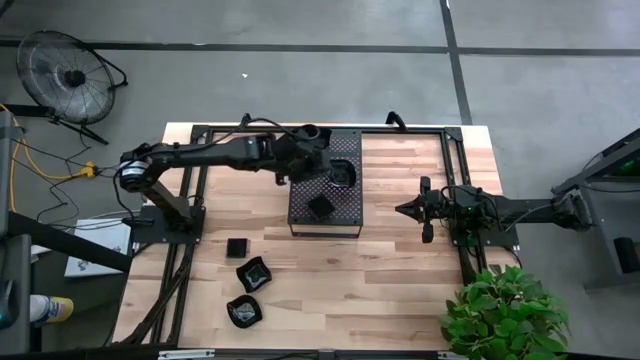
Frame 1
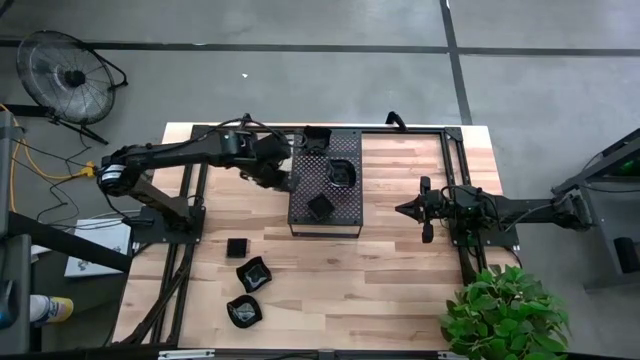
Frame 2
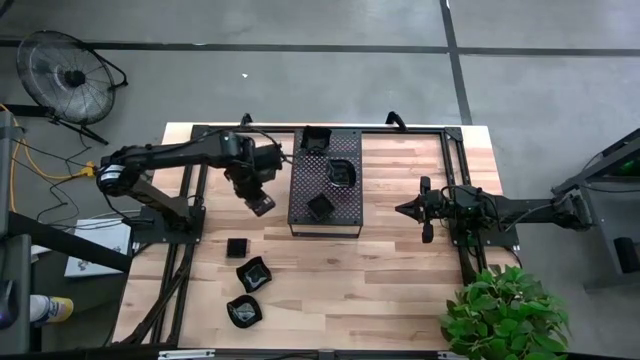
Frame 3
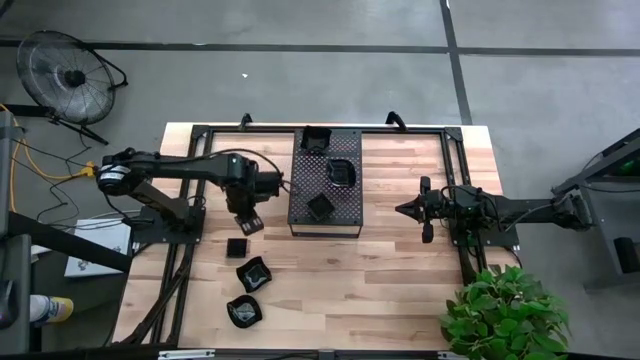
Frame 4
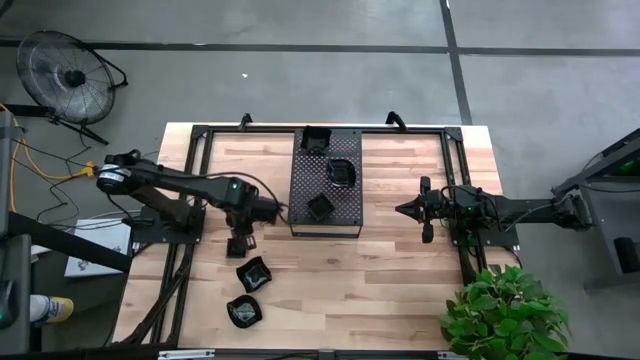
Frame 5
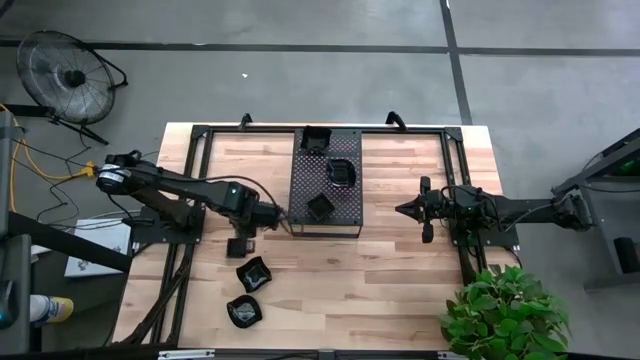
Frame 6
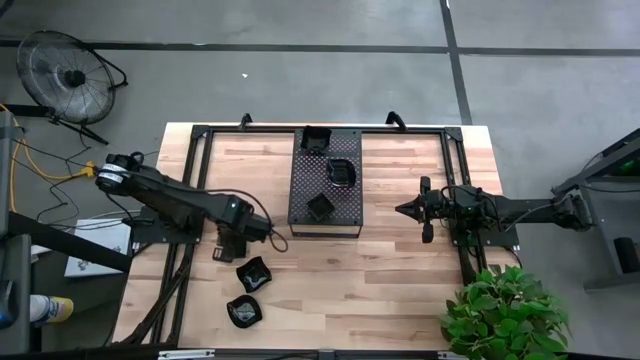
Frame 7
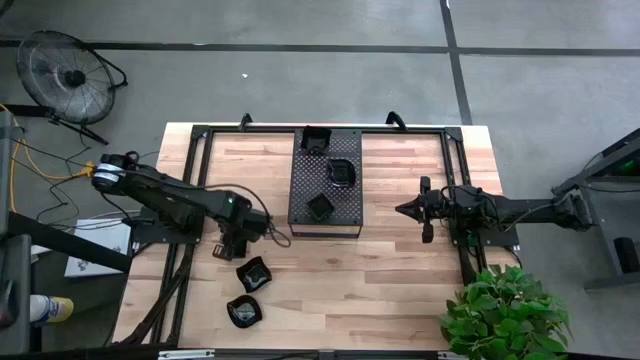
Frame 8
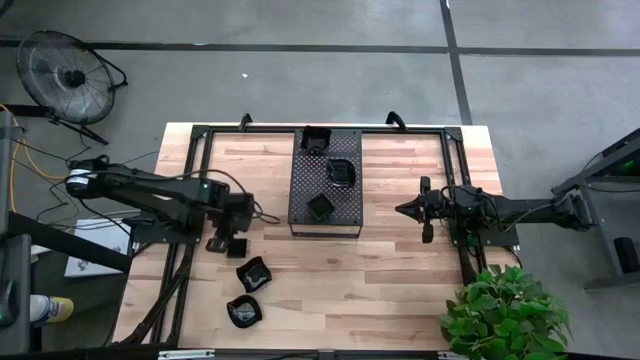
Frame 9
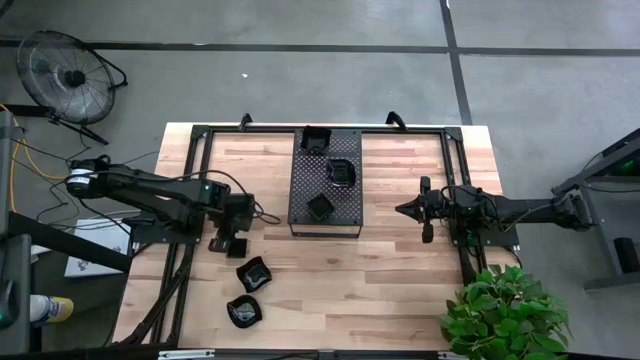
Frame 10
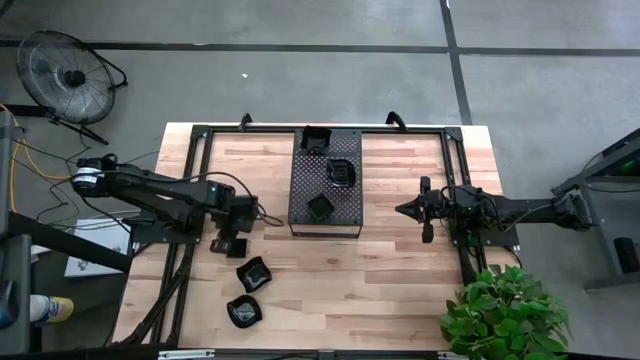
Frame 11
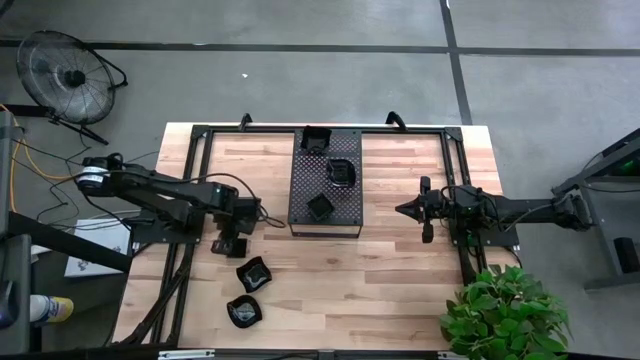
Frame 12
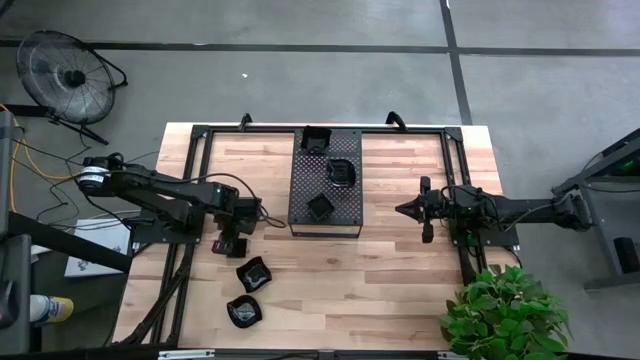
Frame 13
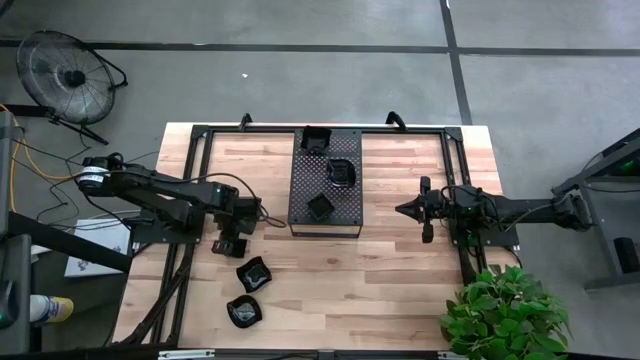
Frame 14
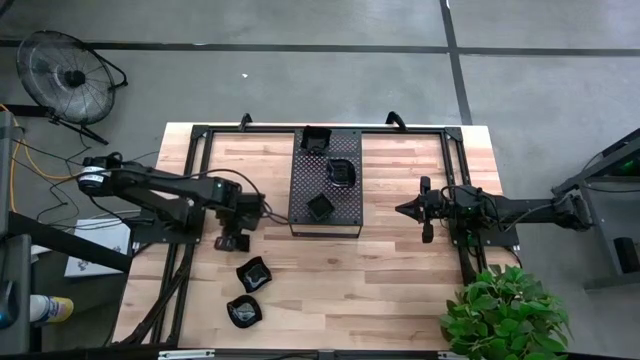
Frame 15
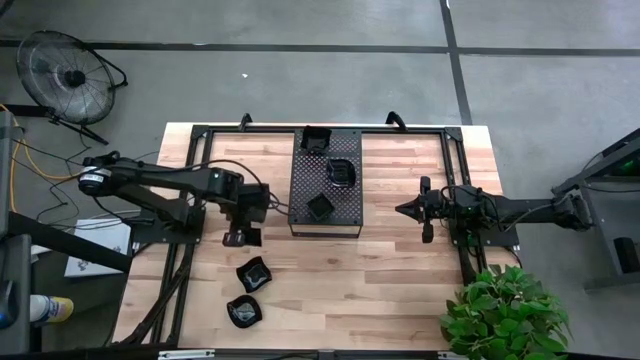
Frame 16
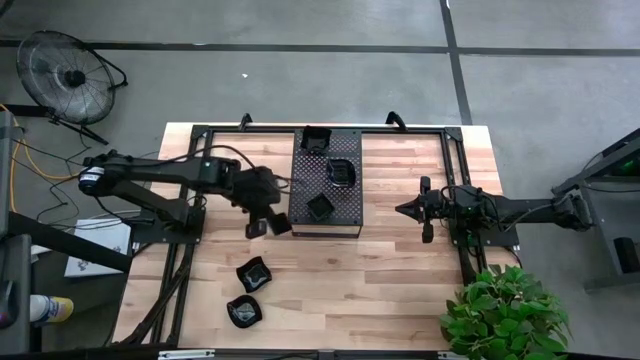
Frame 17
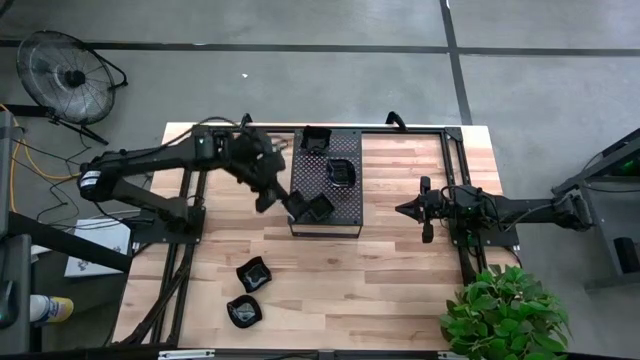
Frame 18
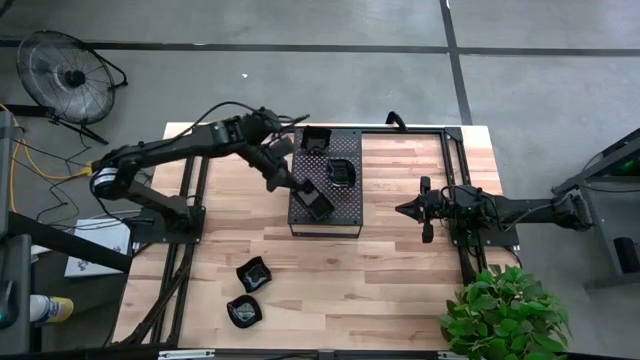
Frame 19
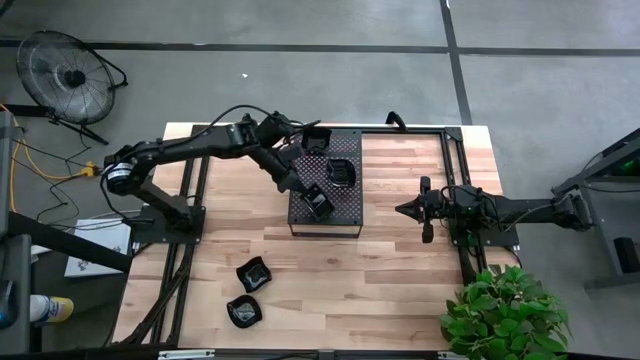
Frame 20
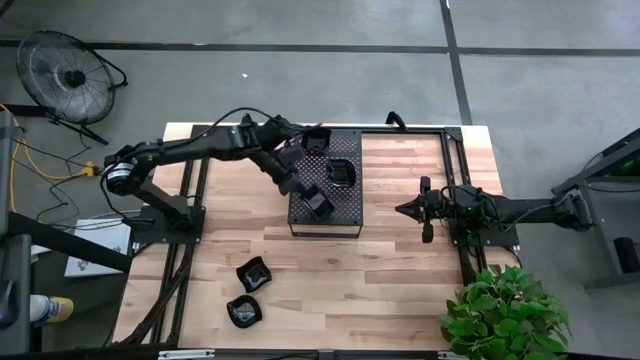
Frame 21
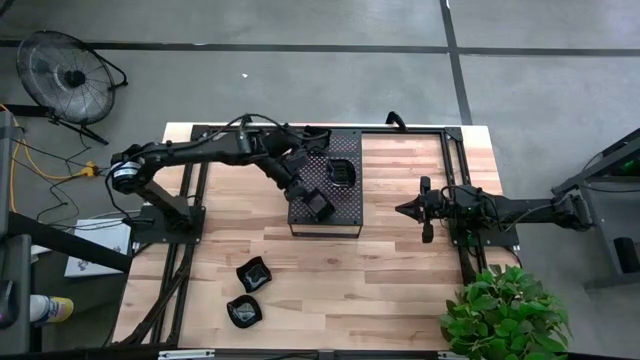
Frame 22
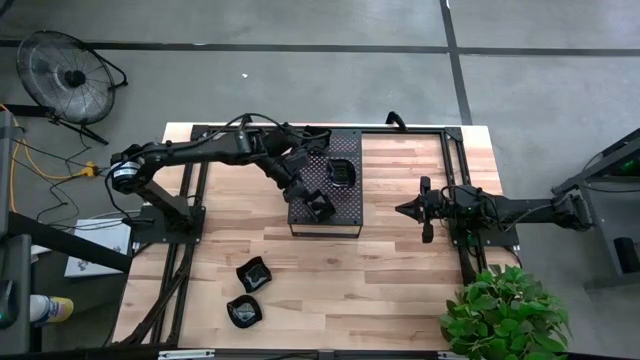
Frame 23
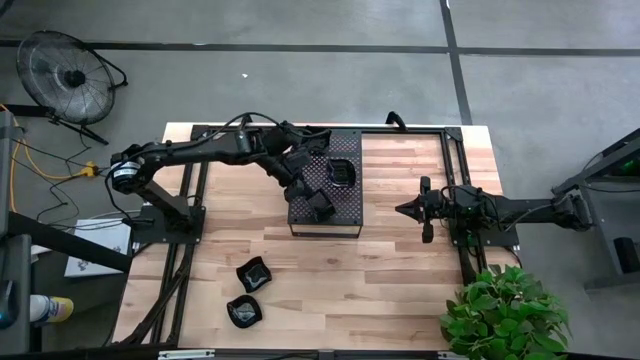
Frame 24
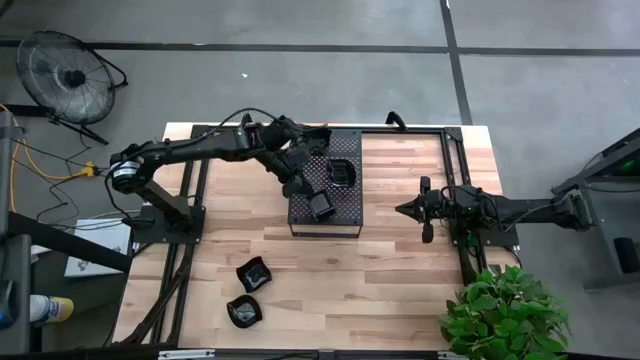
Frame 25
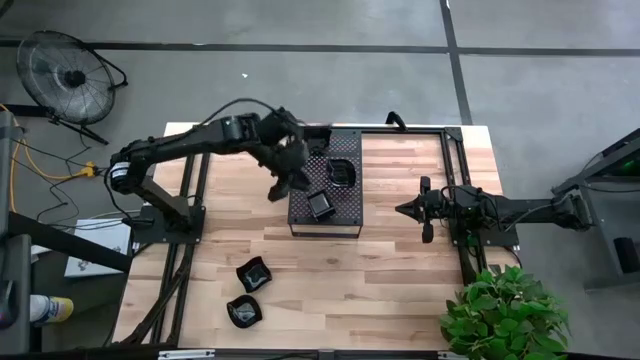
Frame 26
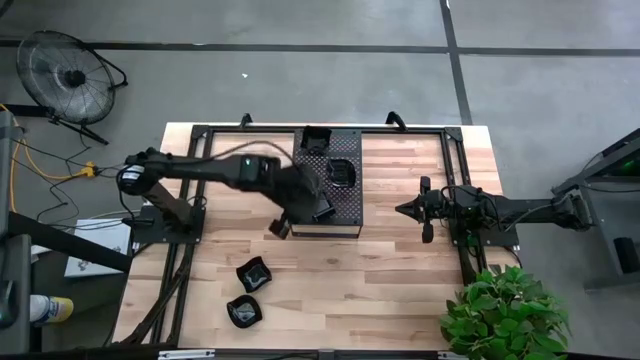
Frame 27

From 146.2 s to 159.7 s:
Task: Pick & Place Mini shaped plates
Stack the black square shape plate on top of the other black square shape plate on the shelf

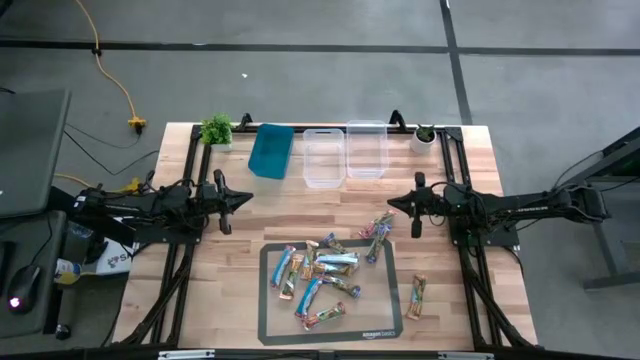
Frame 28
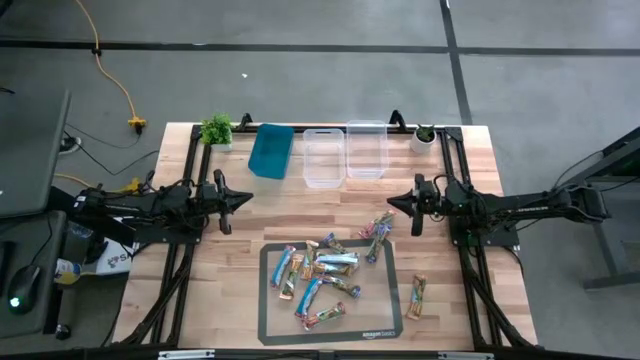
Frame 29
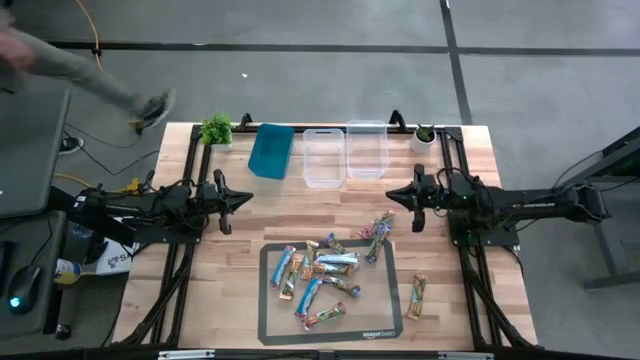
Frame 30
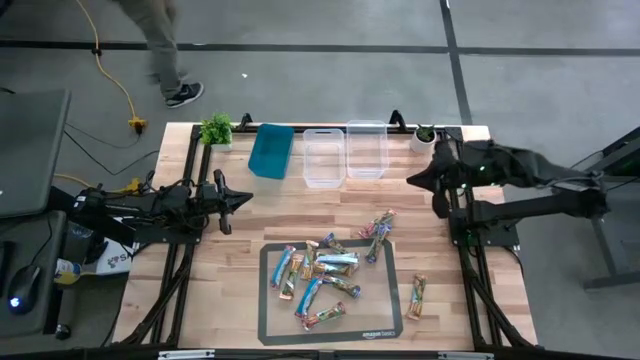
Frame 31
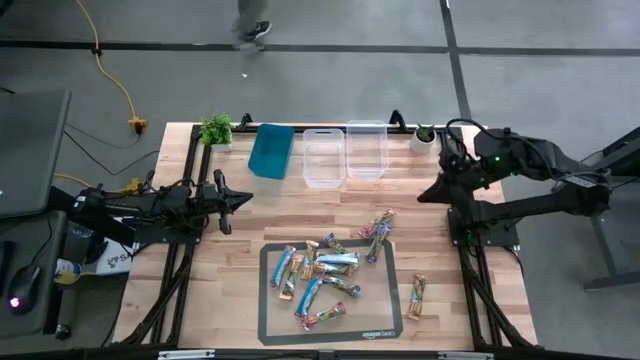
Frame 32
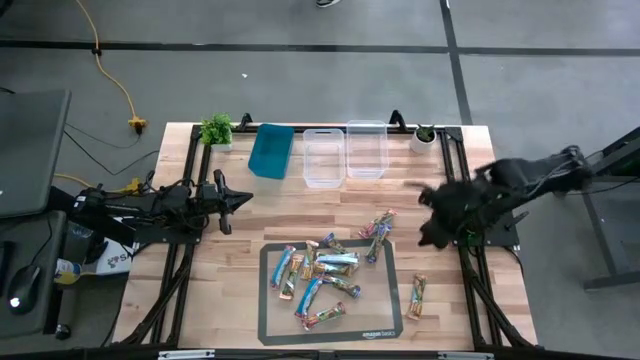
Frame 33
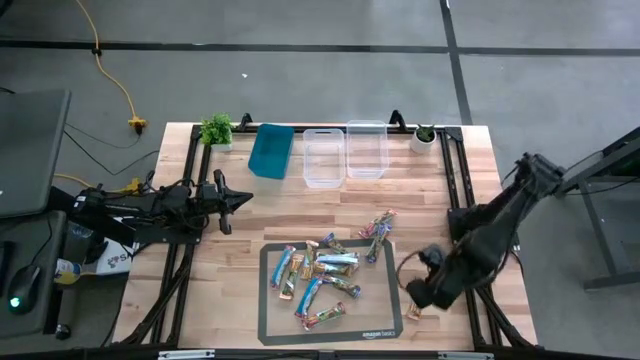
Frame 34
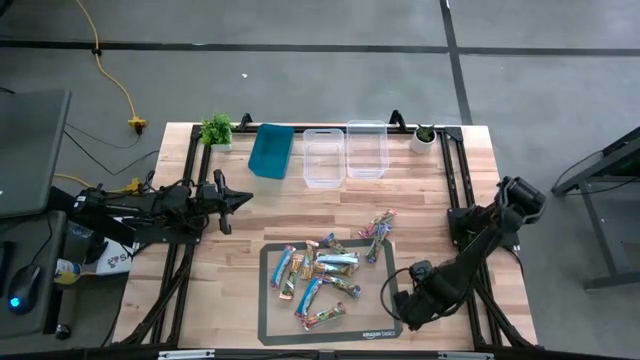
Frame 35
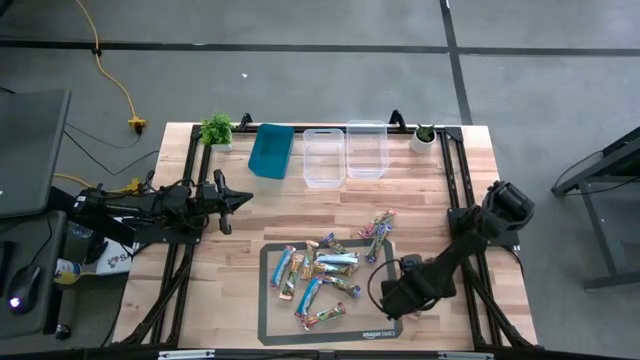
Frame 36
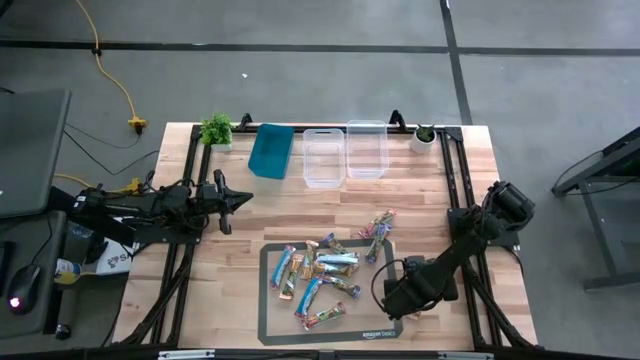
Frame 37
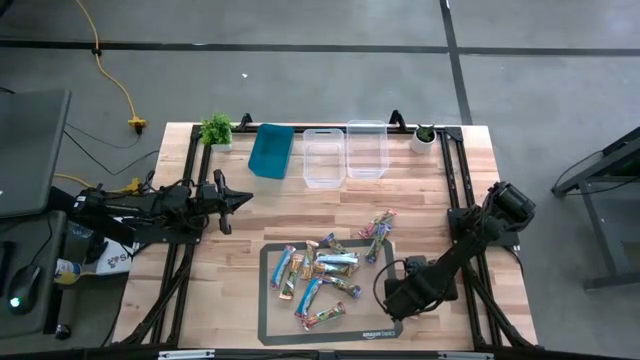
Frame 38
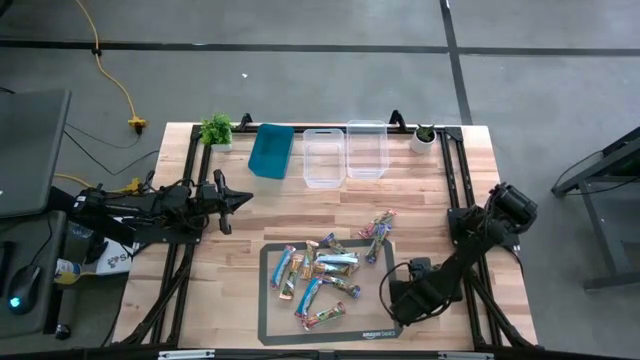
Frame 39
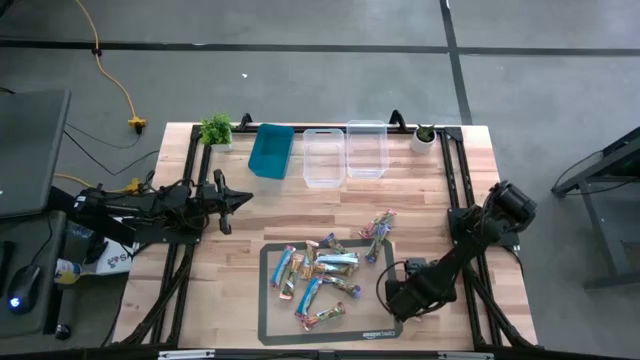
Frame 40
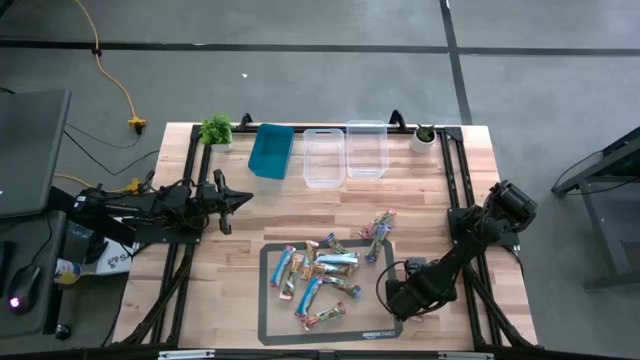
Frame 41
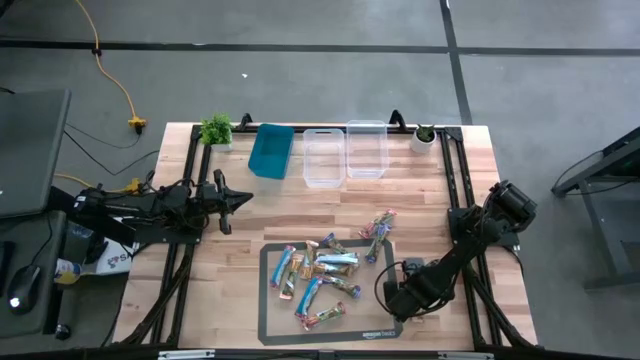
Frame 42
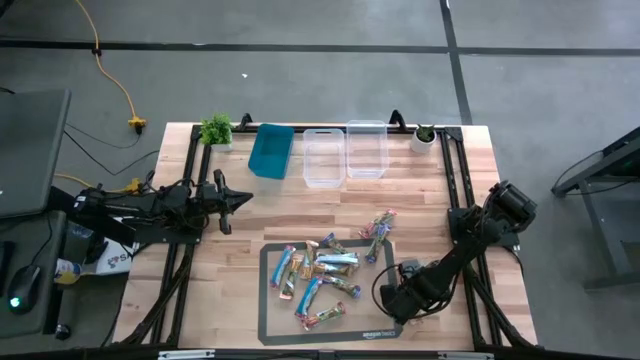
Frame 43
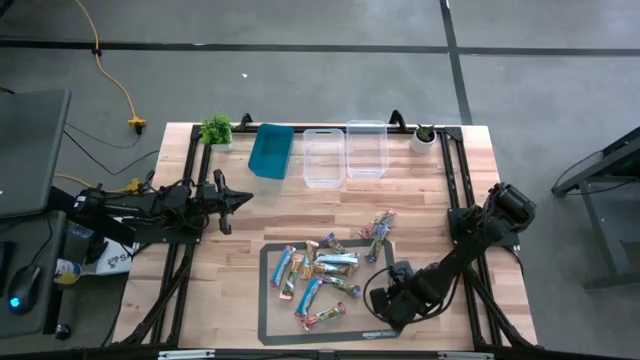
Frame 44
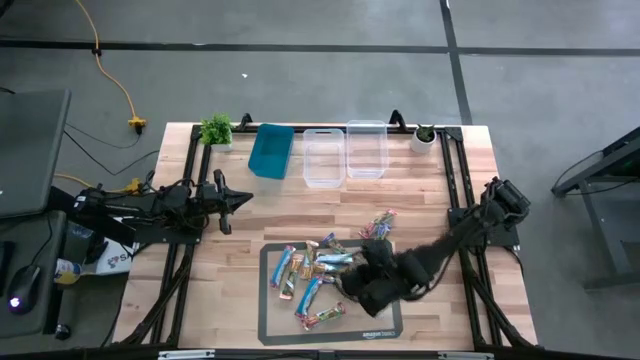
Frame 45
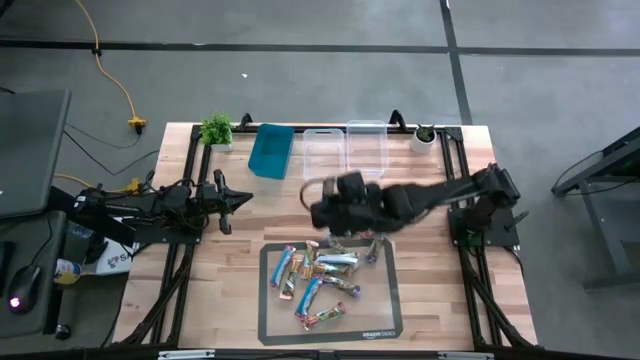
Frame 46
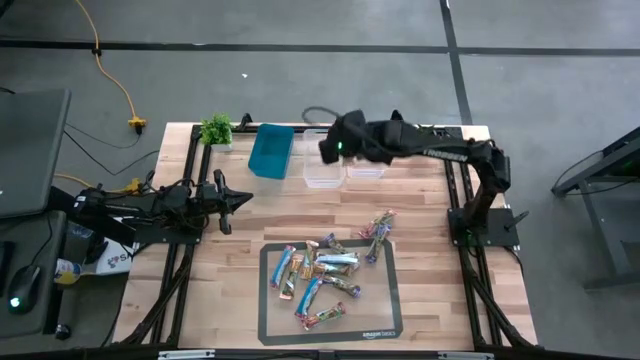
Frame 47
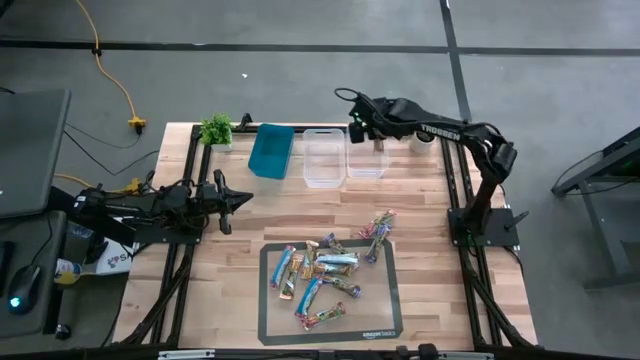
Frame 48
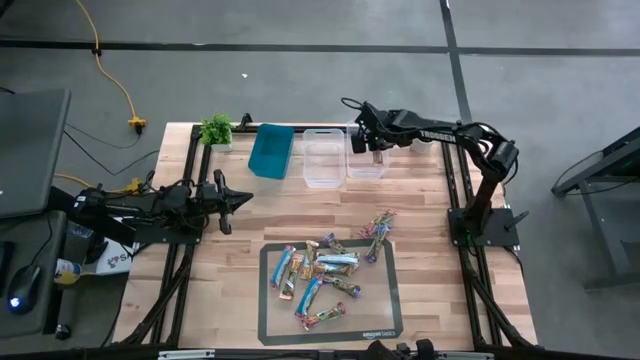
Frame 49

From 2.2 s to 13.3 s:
Task: Pick and place Granola Bars by type
Put the yellow granola bar into the right transparent bin
